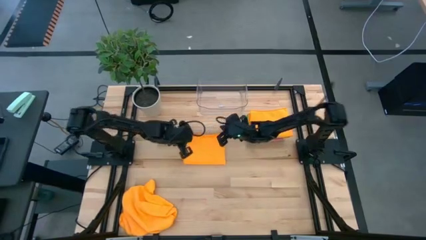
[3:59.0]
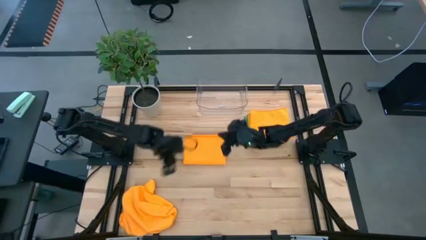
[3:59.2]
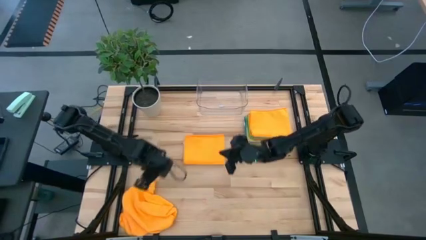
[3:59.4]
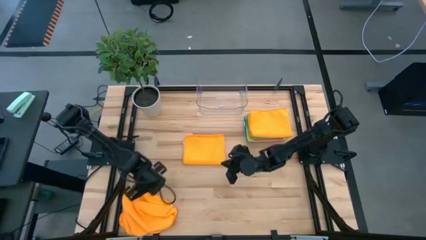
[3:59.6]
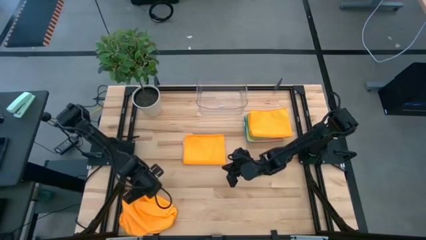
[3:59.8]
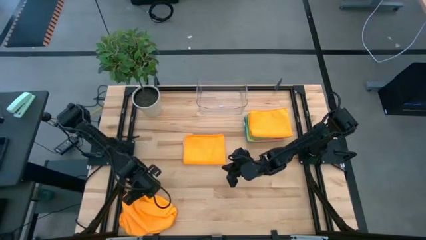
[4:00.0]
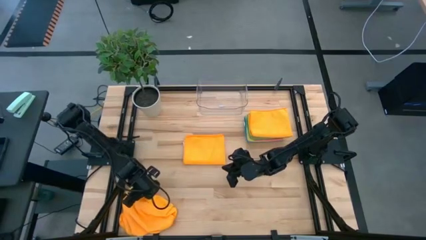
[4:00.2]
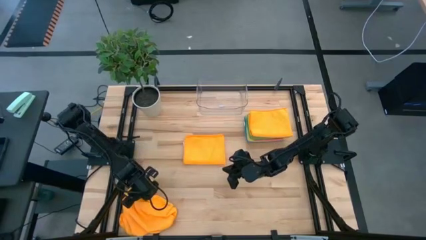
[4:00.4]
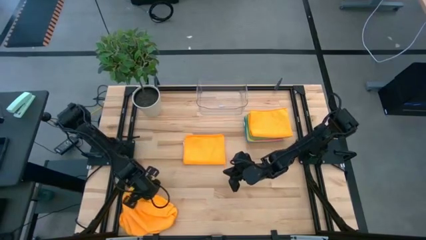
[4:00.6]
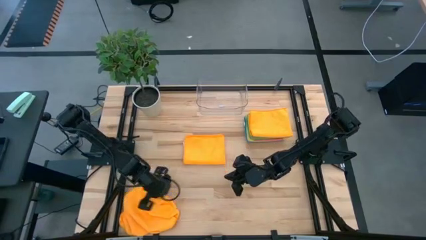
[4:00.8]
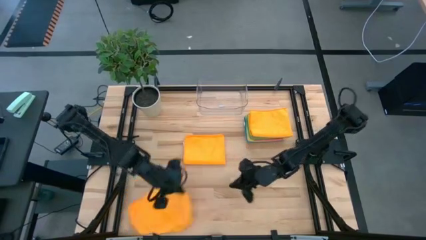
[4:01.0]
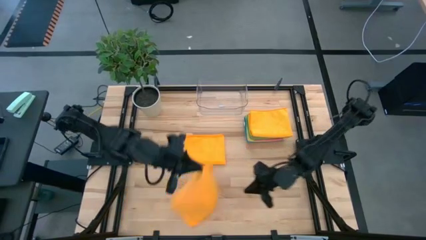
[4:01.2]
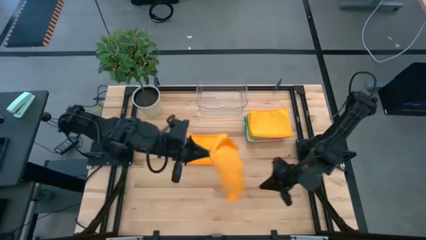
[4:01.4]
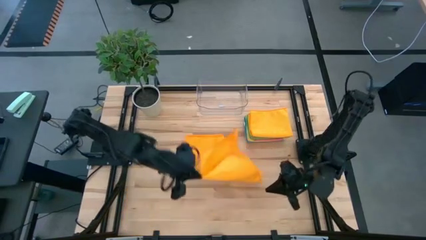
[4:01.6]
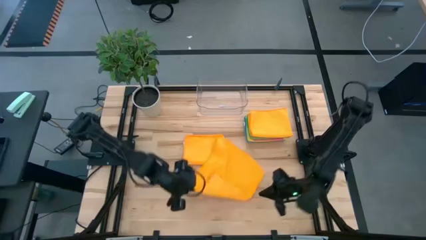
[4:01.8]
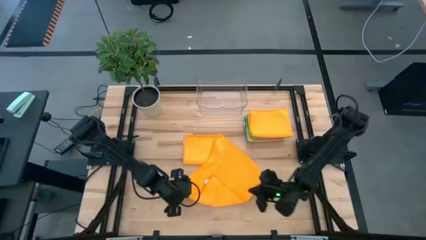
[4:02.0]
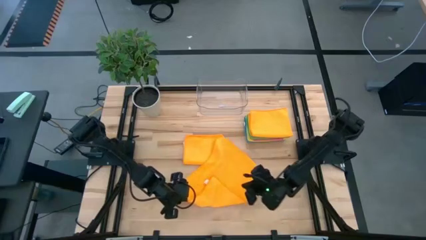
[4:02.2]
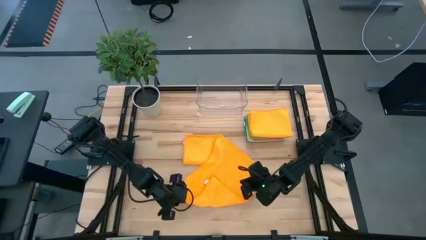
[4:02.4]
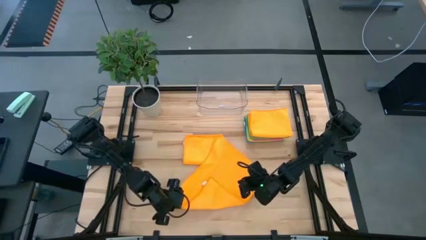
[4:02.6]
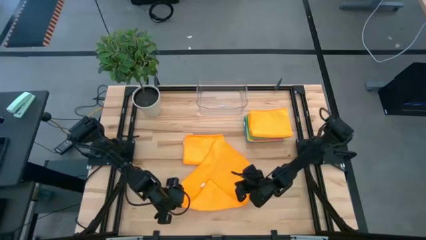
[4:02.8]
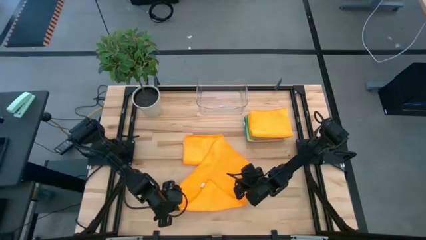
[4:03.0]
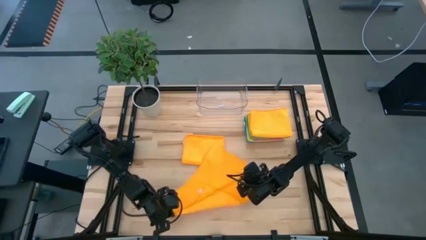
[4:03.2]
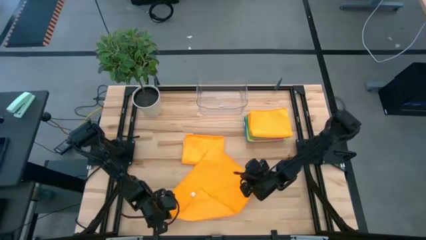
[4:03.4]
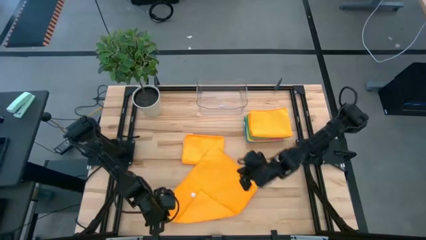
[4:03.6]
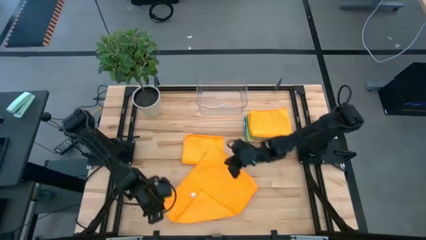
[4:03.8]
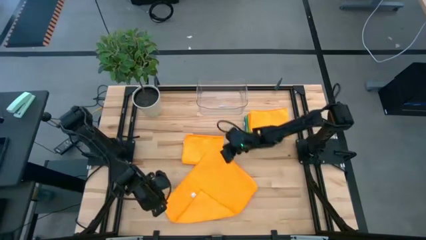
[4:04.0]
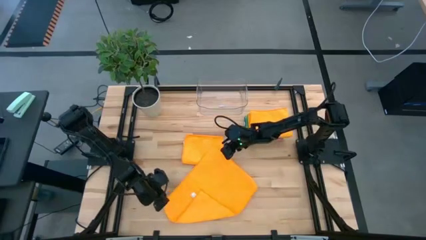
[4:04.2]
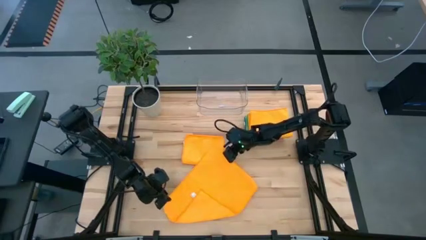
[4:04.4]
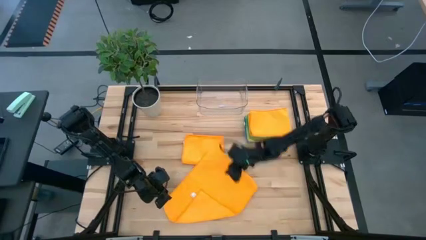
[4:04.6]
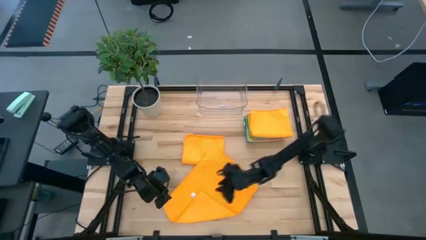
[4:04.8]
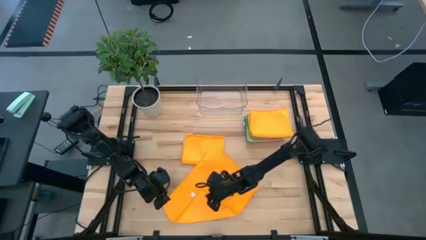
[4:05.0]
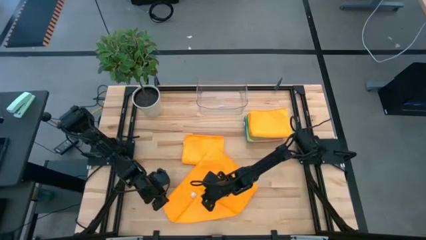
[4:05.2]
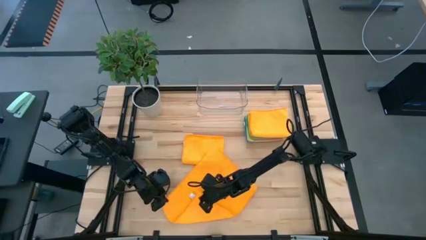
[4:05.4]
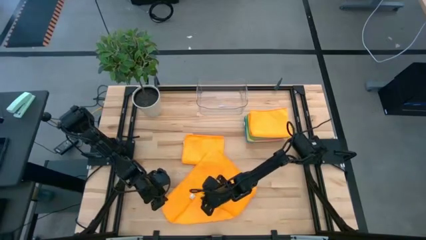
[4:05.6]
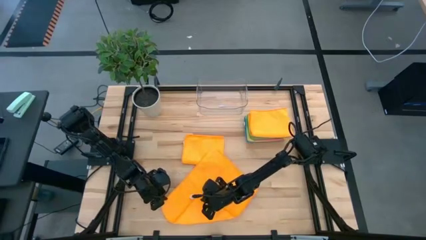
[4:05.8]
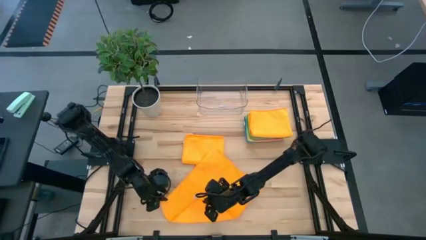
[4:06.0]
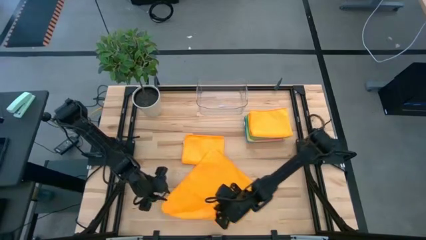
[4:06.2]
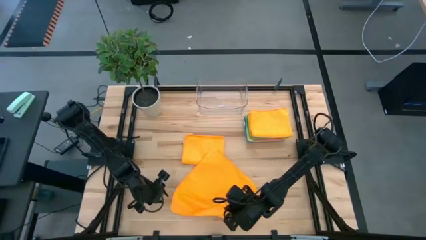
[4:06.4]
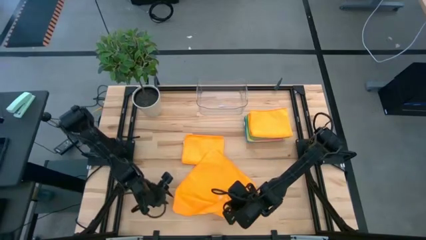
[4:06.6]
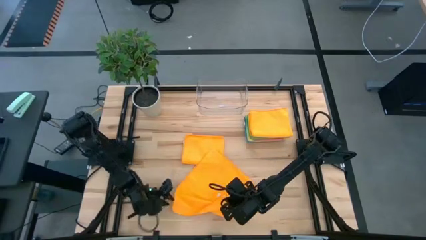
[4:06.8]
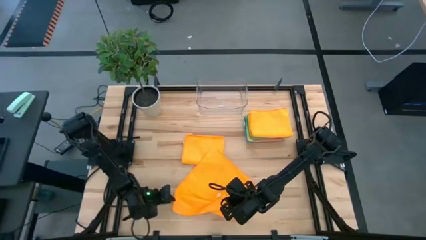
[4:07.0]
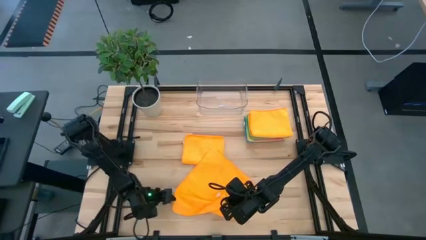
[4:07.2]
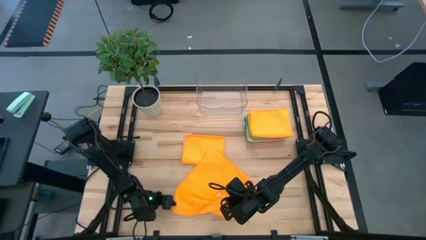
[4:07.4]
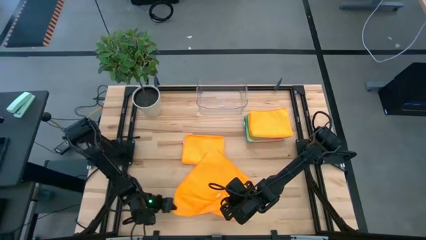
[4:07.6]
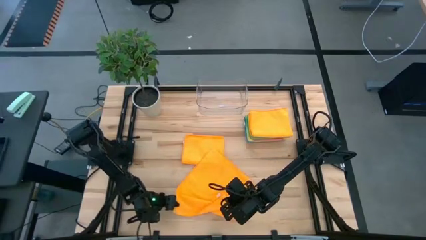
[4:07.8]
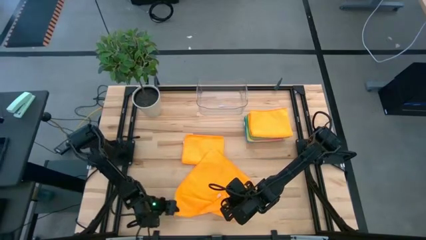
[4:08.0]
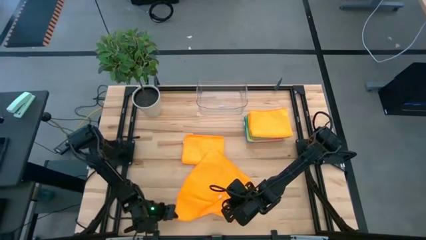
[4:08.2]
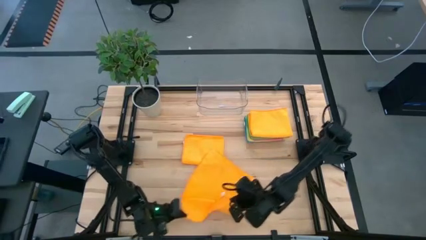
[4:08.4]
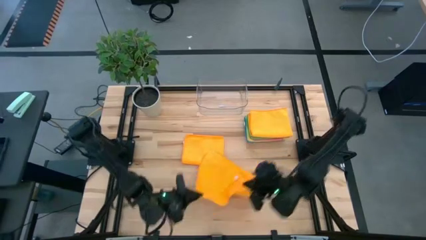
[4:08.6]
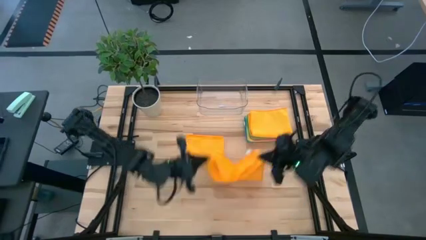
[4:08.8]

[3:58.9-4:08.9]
Task: Fold microfiber towels
Fold the bottom orange towel

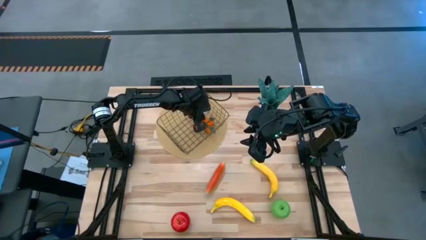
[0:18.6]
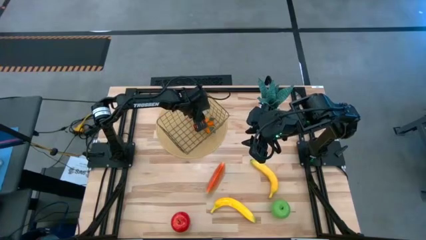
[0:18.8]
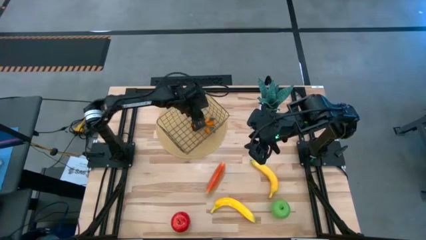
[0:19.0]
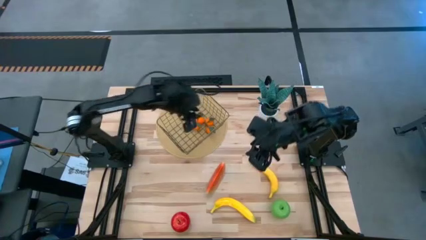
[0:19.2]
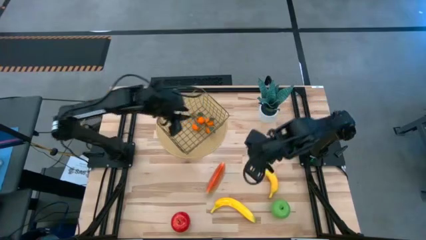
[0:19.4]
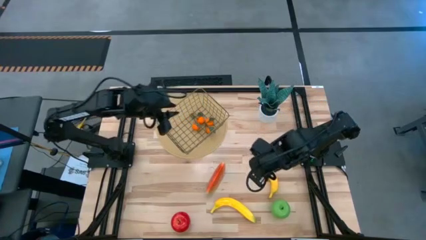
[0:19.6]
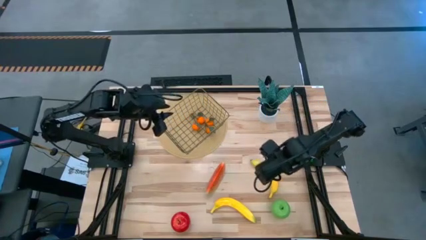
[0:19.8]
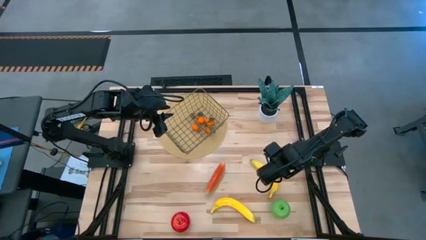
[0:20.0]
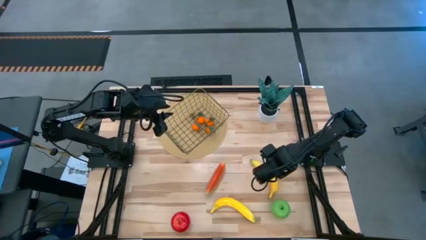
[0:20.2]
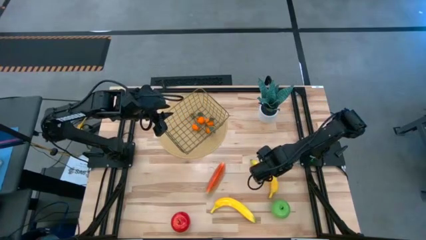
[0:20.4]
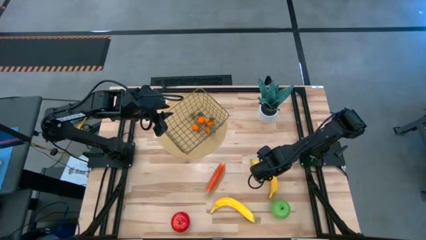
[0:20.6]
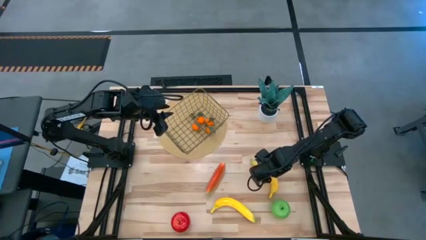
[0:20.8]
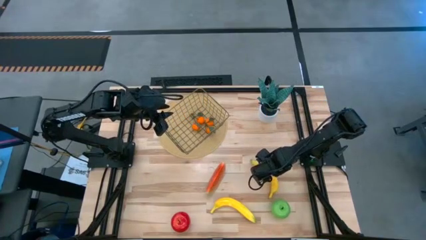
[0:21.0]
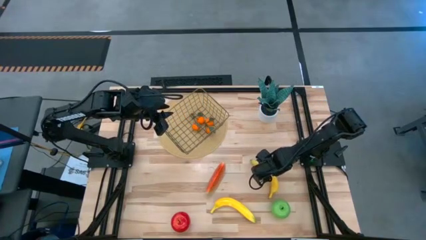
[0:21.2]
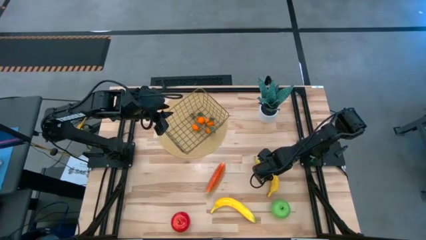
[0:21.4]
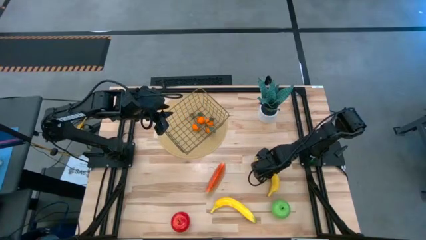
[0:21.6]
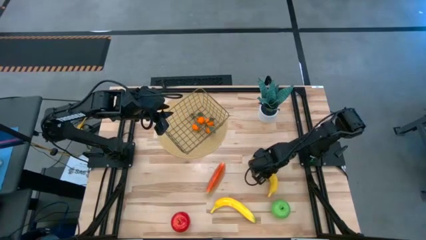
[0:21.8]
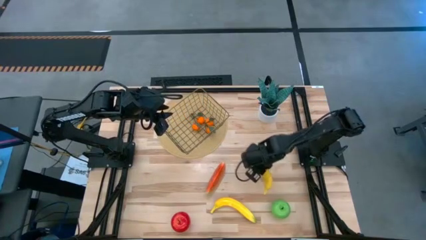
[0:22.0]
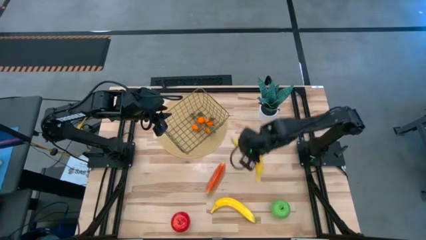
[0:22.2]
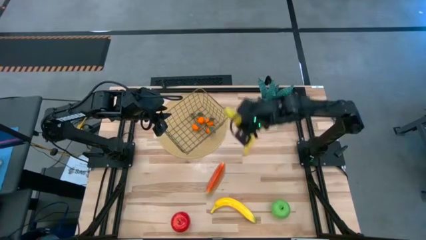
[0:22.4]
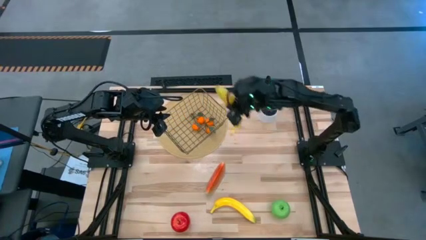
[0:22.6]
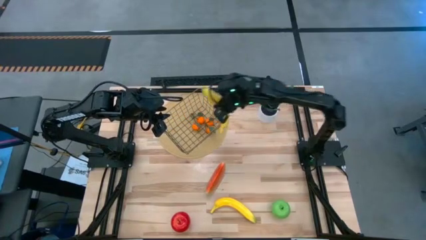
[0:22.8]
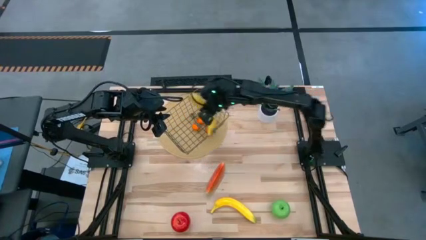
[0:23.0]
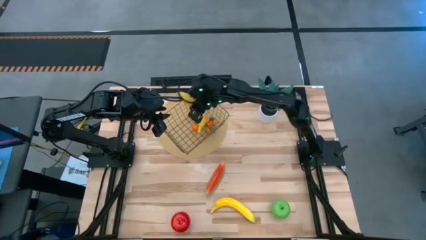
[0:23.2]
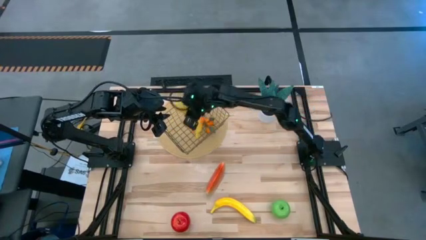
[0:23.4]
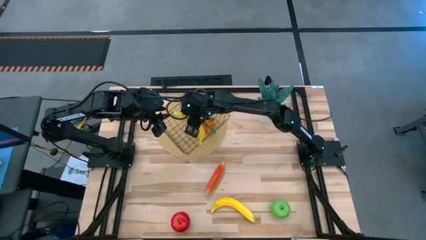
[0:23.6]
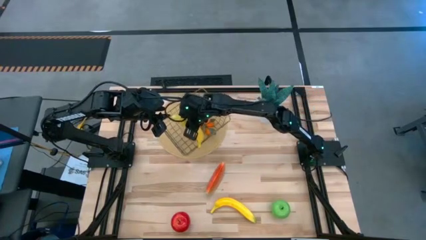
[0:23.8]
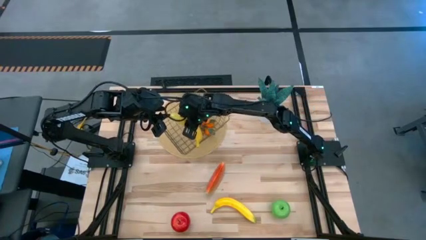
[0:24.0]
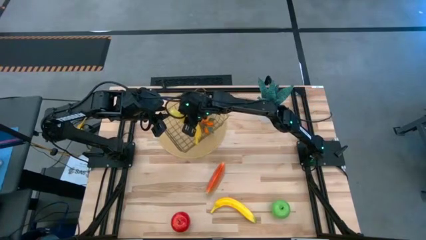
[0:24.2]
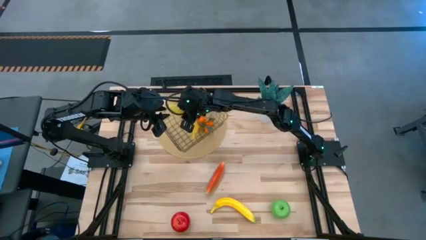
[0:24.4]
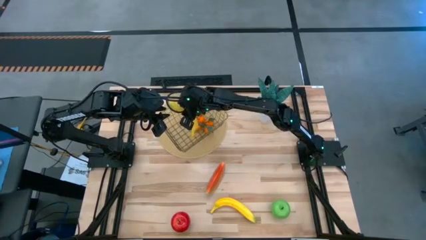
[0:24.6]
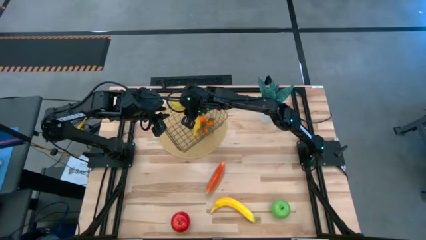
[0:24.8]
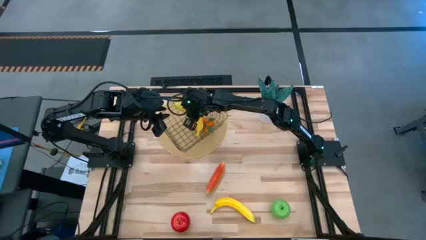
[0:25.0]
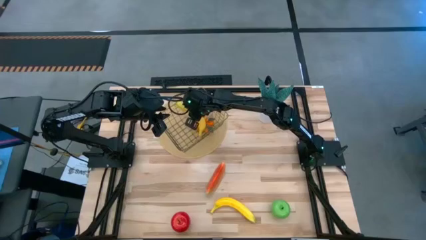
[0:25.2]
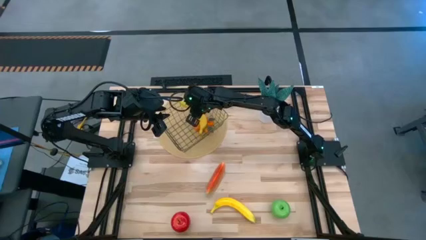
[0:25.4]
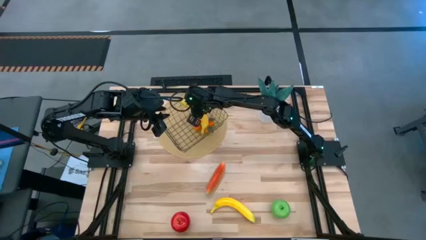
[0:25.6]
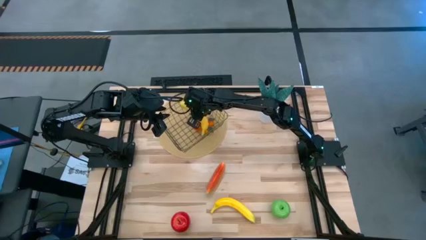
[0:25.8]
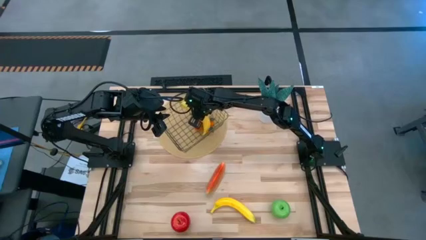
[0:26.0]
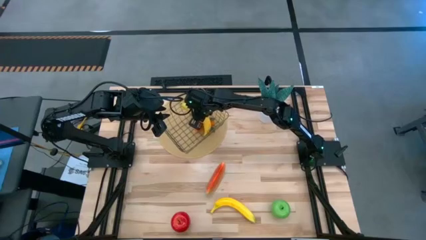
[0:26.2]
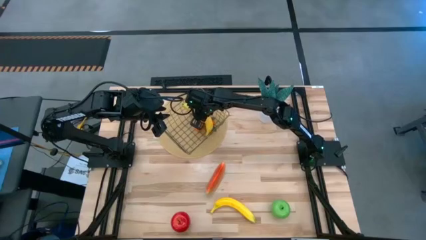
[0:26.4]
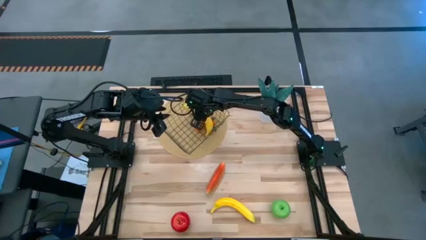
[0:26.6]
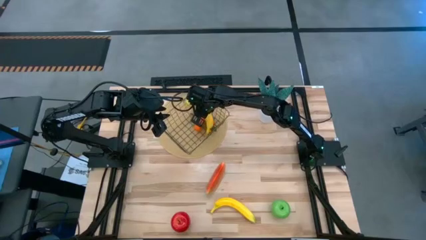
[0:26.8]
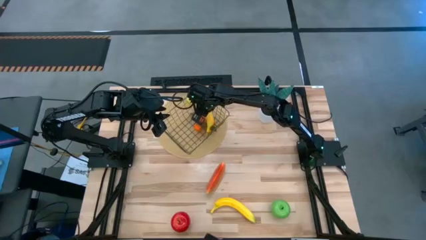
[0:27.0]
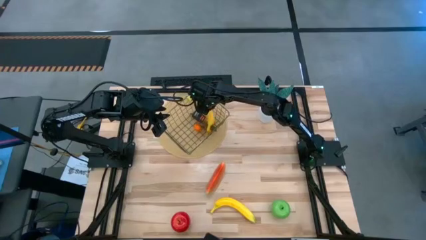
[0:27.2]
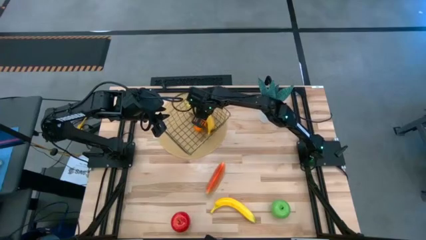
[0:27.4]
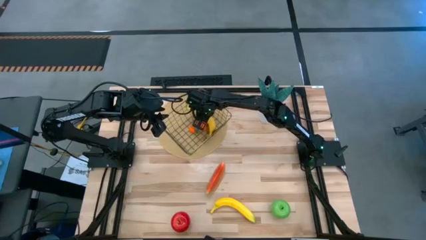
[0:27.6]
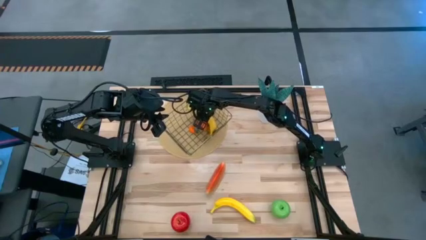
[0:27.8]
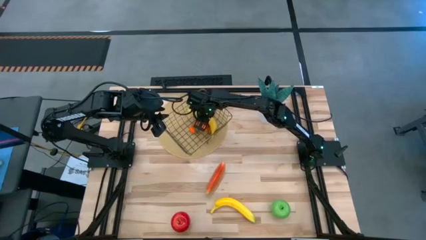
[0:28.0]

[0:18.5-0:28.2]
Task: Build produce basket
Put the top yellow banana into the wire basket
